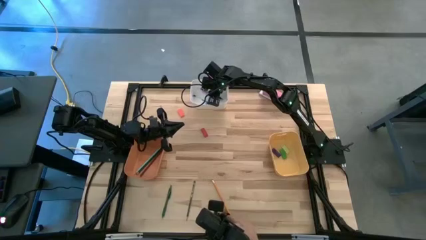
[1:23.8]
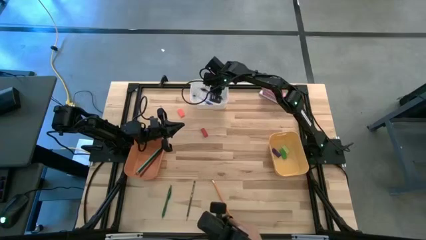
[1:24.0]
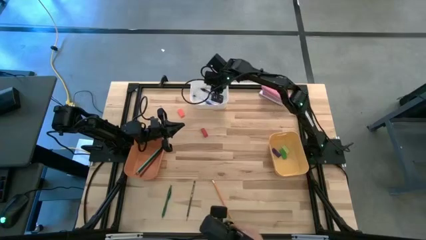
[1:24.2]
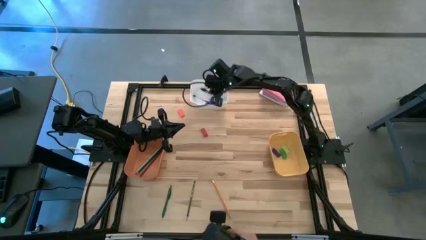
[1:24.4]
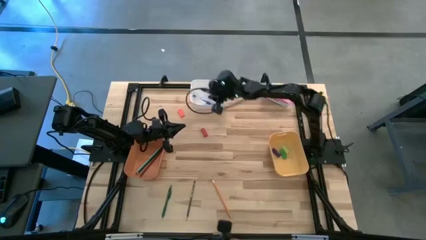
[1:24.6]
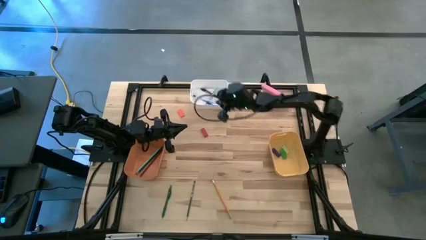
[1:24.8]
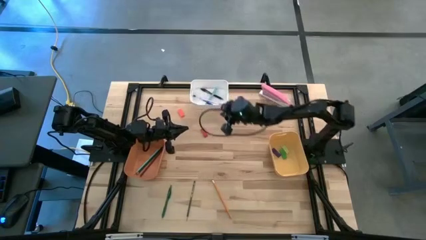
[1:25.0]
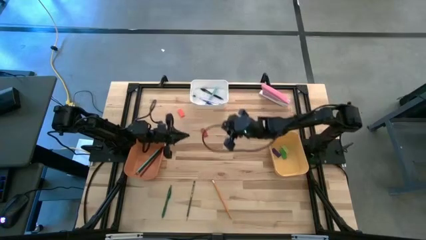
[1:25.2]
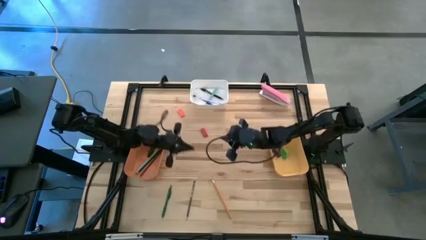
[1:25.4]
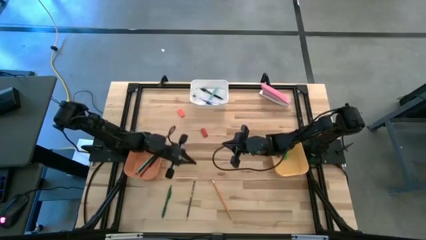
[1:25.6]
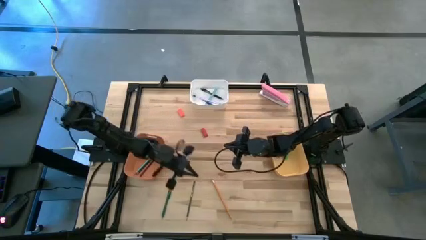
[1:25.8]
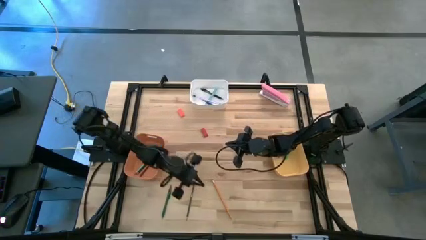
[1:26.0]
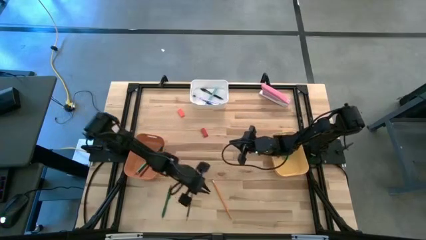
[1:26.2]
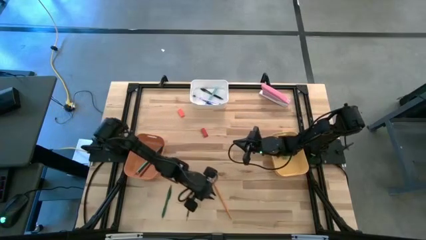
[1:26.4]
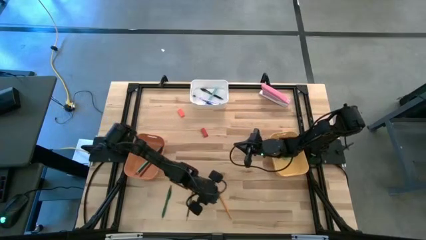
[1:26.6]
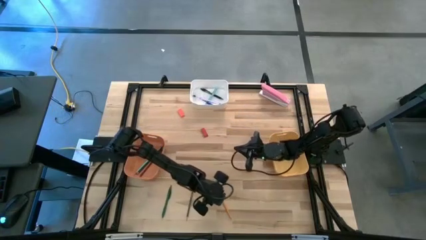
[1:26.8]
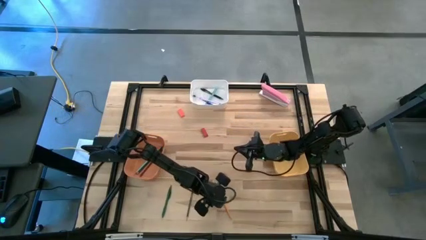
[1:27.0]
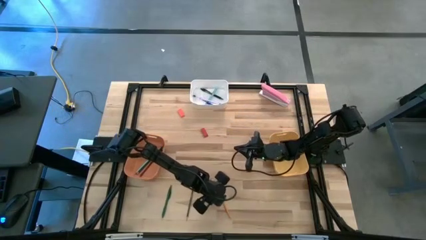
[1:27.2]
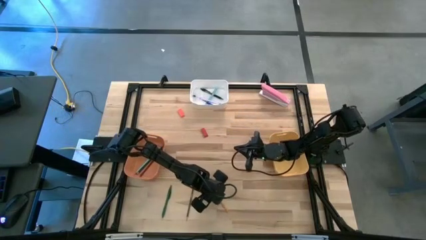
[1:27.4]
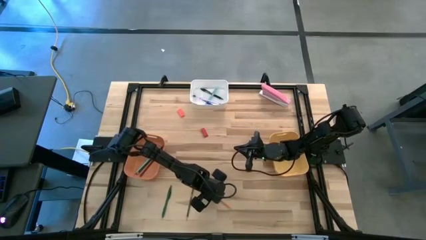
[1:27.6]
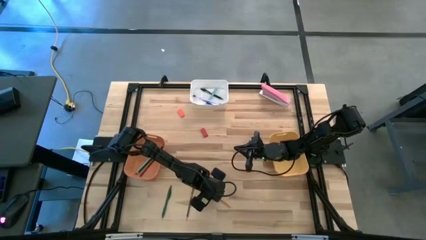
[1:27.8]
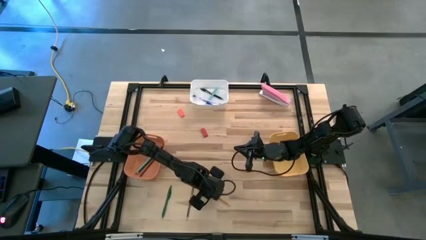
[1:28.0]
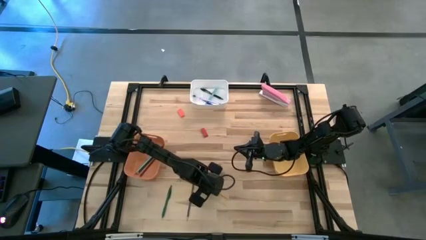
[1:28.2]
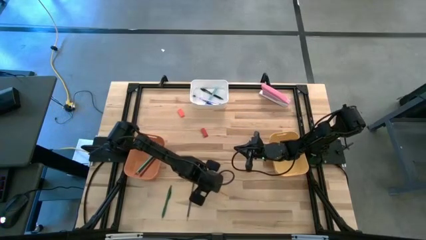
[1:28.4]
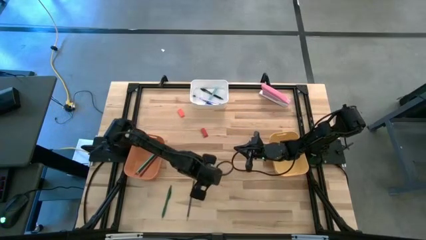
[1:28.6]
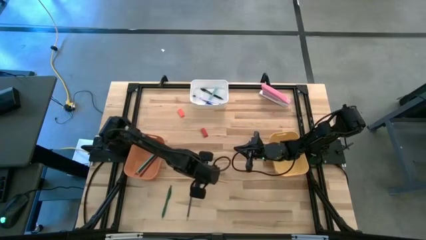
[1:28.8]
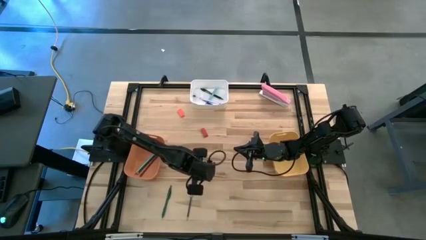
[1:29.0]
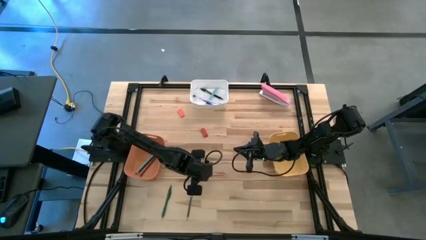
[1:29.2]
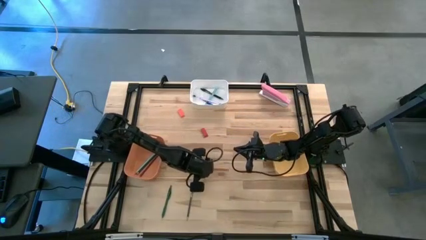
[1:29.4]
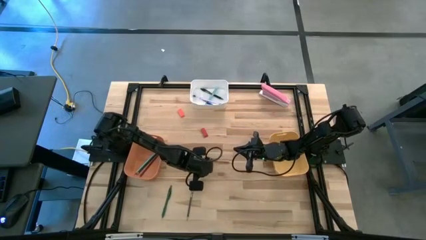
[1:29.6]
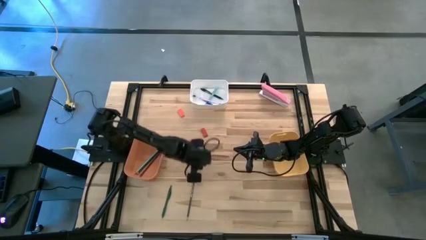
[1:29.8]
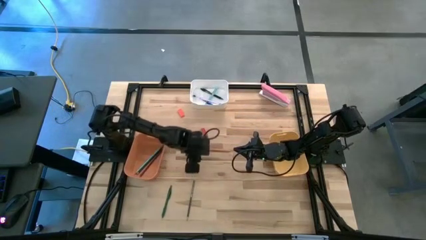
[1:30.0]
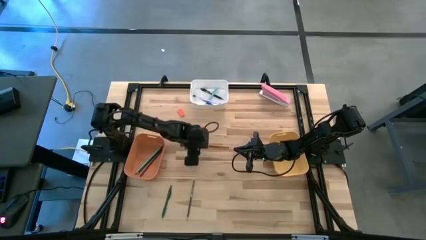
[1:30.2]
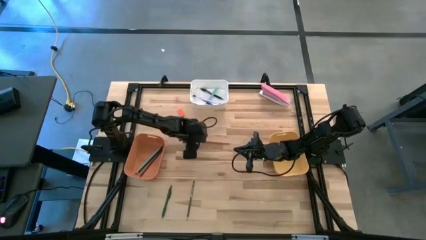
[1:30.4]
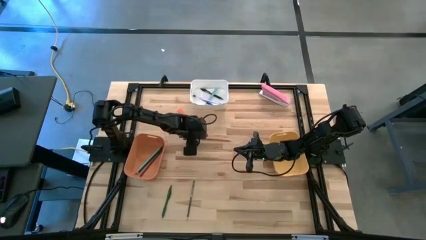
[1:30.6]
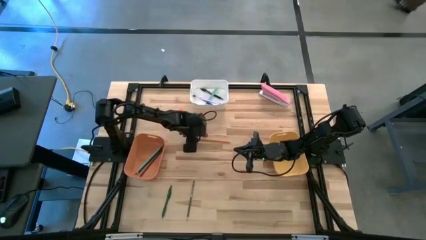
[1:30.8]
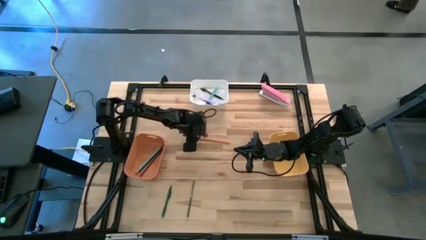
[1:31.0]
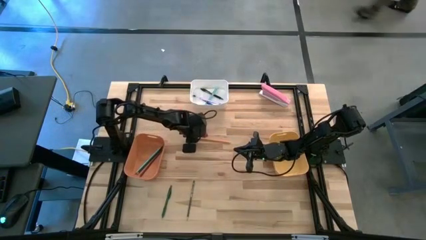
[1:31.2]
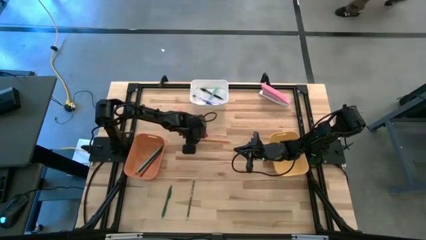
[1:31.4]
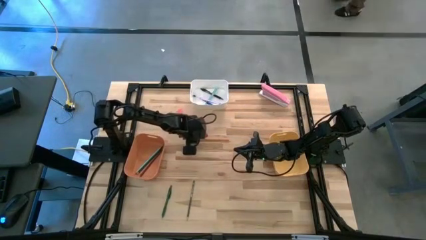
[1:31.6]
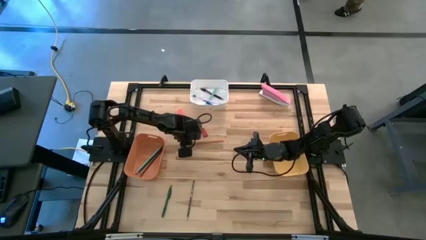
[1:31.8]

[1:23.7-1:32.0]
Task: Sort crayons/erasers/pens/pencils in bins
Put the orange pencil into the orange bin

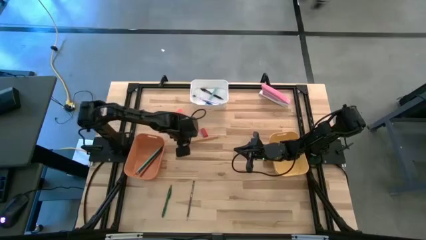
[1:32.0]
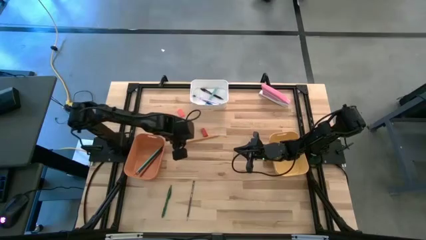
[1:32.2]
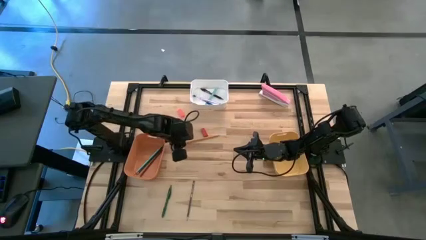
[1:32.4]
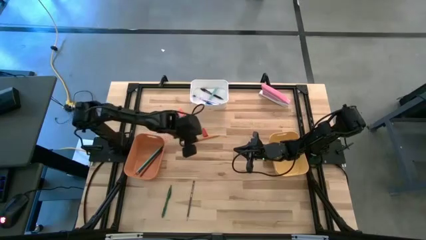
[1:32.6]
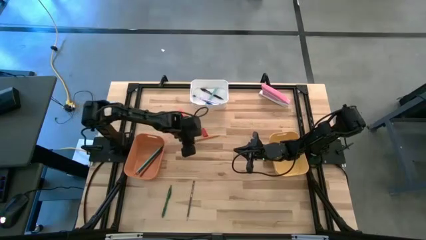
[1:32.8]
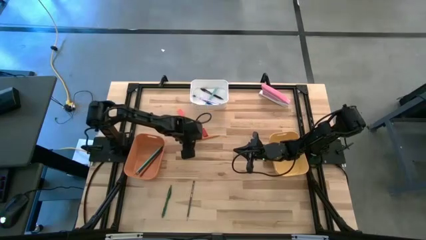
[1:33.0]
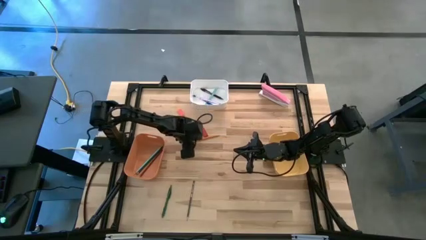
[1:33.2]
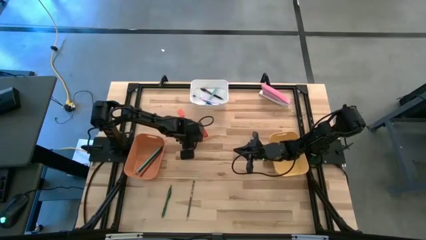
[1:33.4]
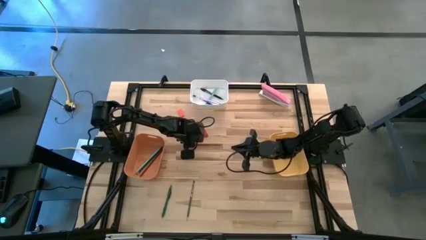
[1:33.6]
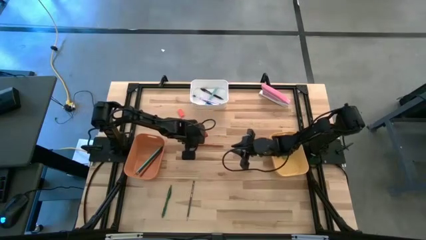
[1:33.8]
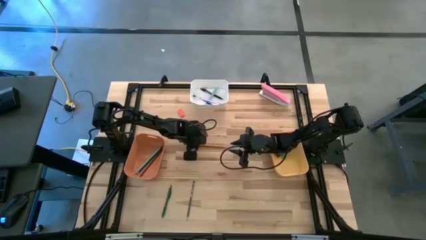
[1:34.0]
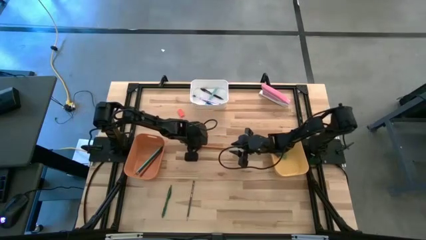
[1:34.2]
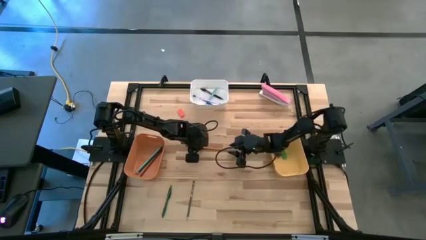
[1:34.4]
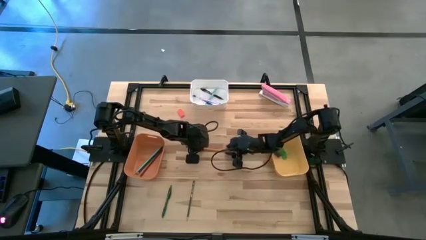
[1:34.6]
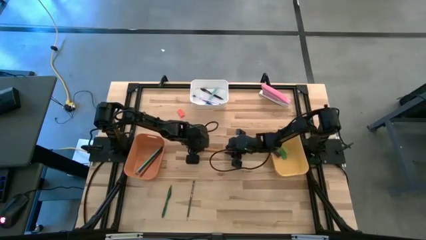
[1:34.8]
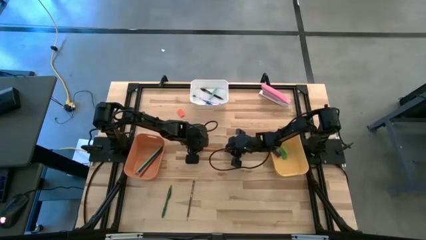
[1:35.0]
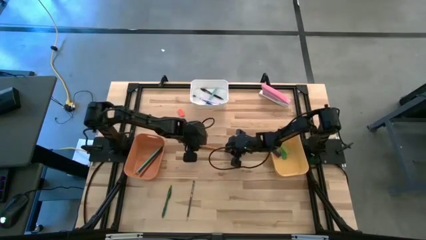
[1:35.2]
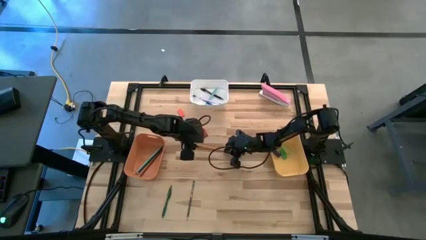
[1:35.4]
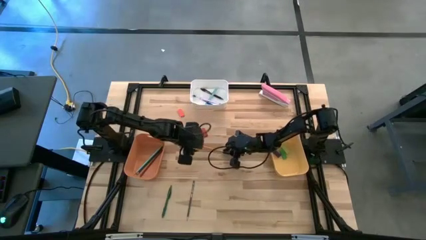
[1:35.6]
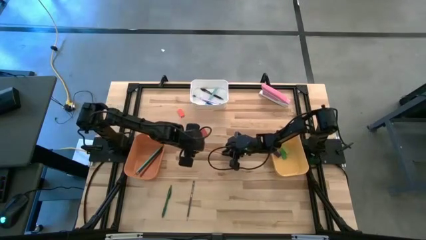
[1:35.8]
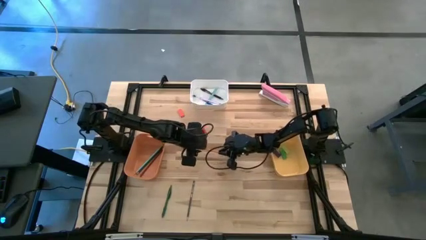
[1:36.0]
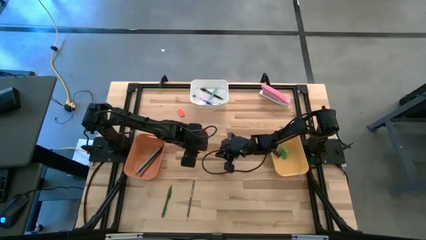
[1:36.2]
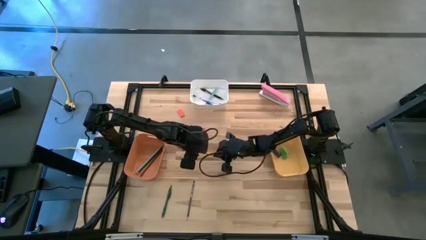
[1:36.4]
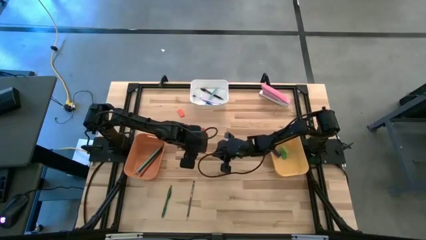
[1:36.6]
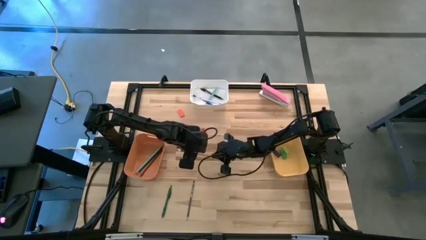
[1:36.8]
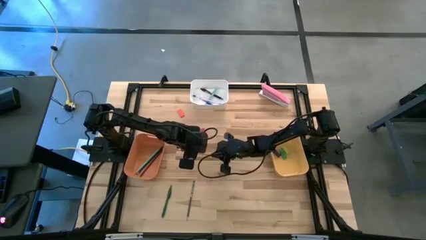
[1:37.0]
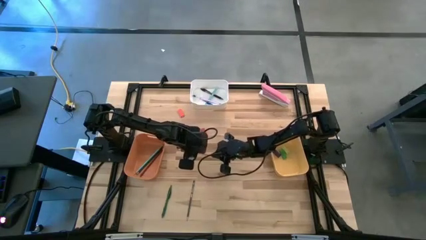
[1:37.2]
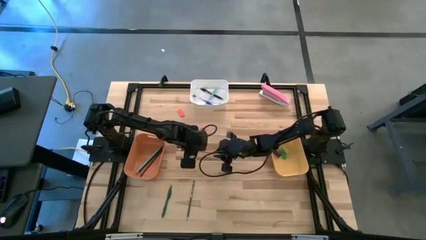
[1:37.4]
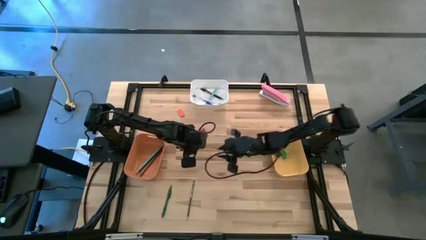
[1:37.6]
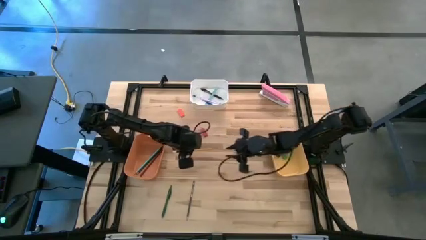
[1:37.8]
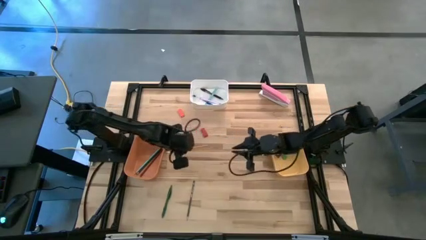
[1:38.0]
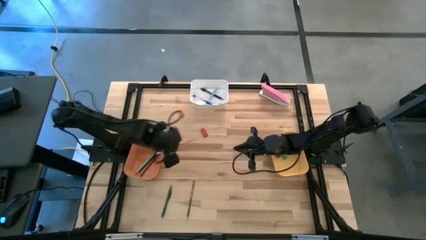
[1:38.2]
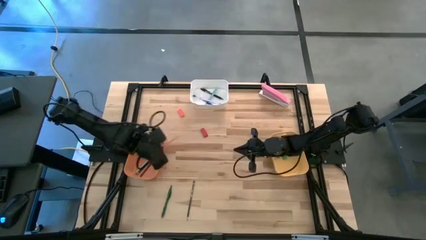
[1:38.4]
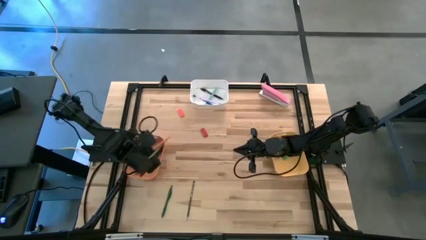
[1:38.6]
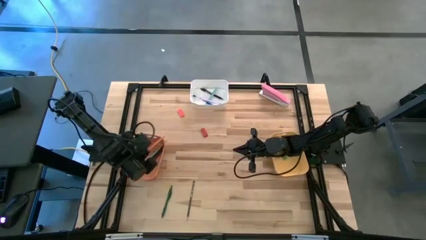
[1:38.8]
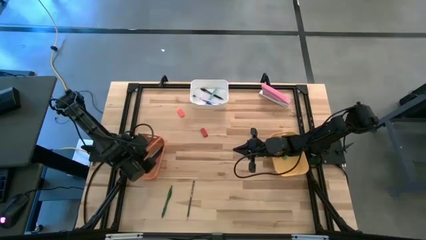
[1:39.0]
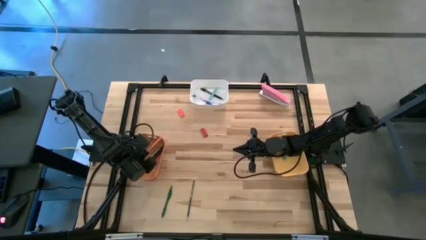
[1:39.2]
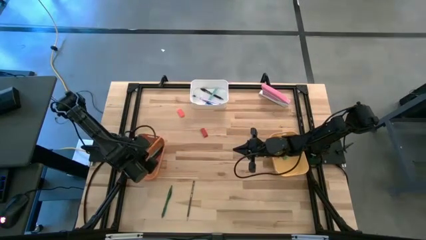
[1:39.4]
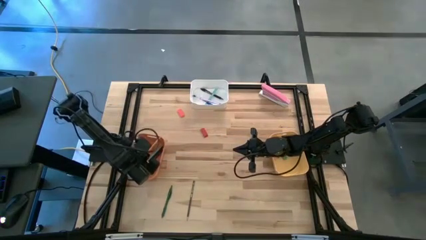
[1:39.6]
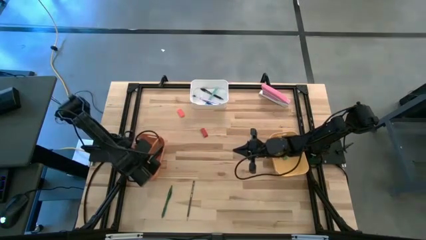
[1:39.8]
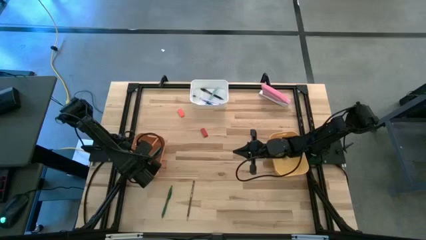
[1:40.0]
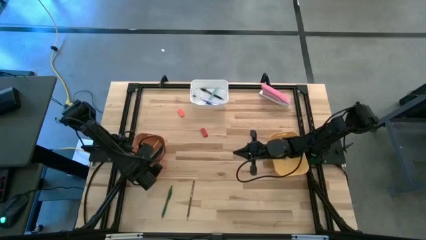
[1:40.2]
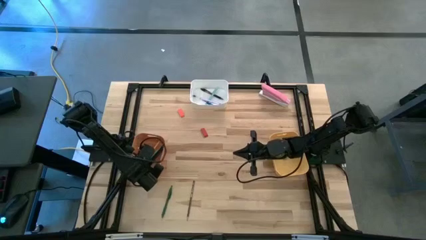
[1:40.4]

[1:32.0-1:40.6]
Put the orange pencil into the orange bin
